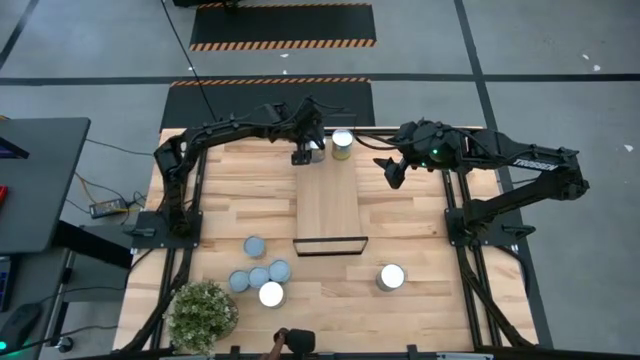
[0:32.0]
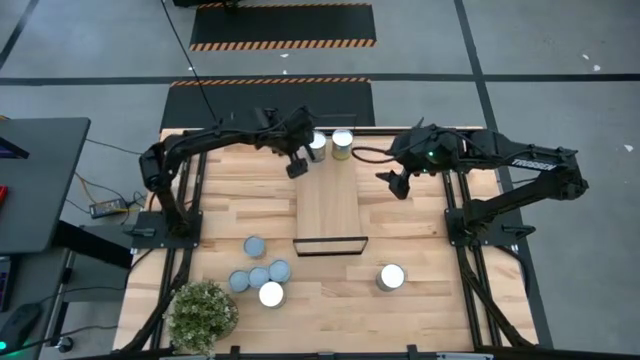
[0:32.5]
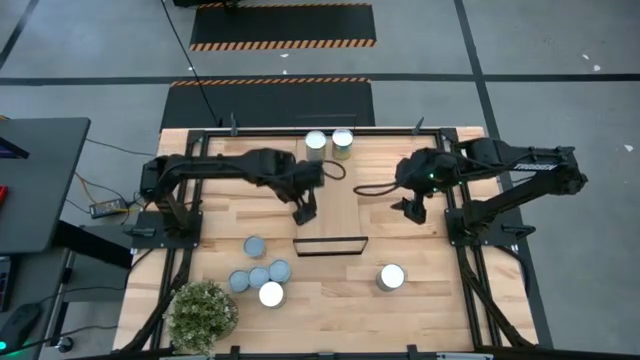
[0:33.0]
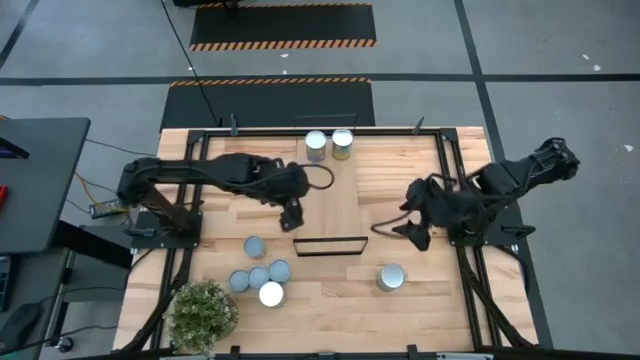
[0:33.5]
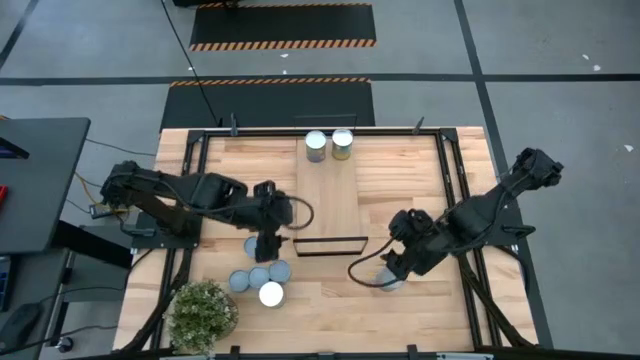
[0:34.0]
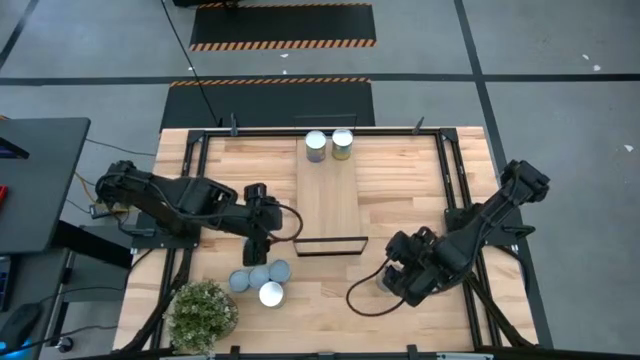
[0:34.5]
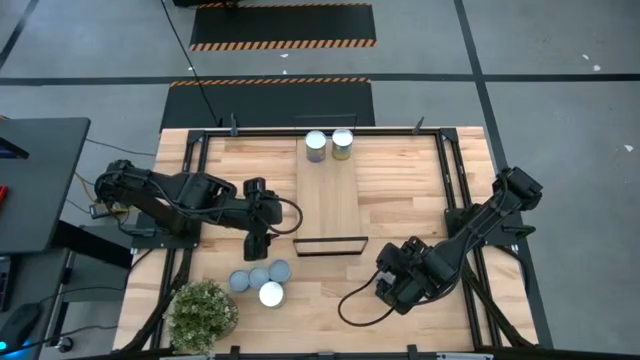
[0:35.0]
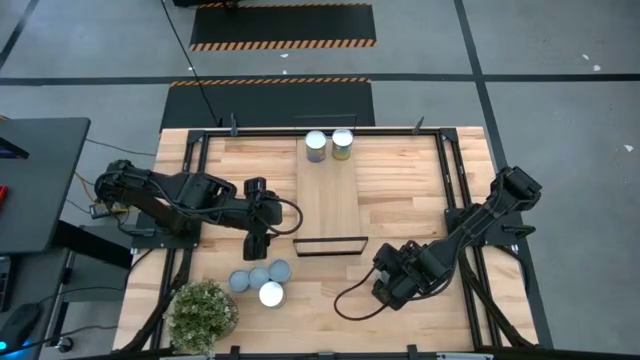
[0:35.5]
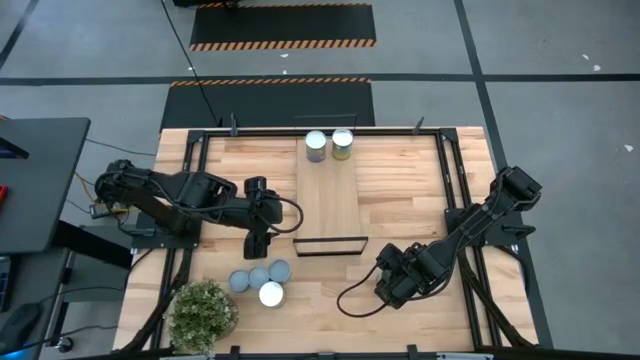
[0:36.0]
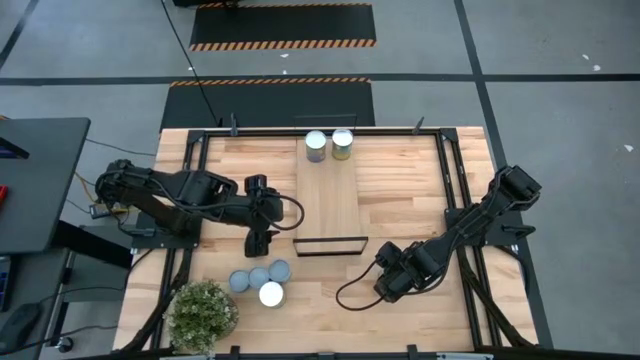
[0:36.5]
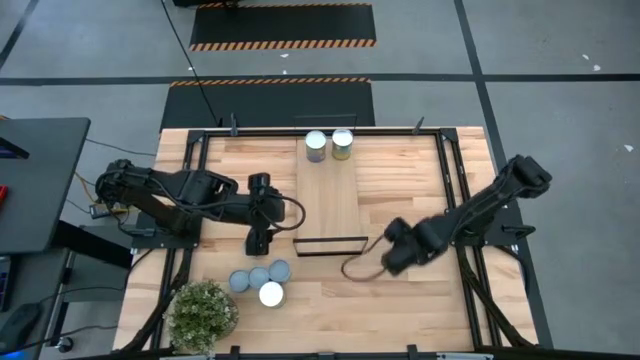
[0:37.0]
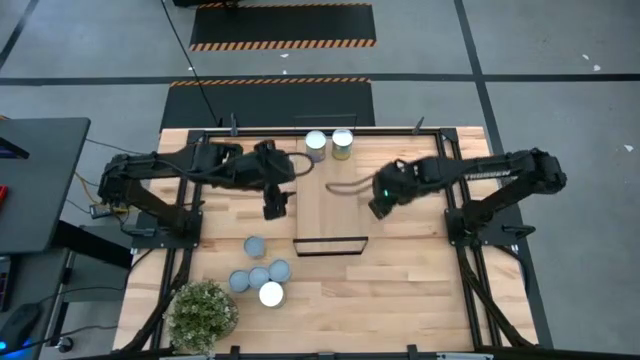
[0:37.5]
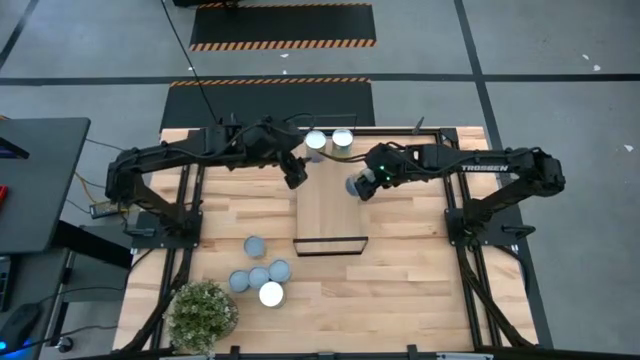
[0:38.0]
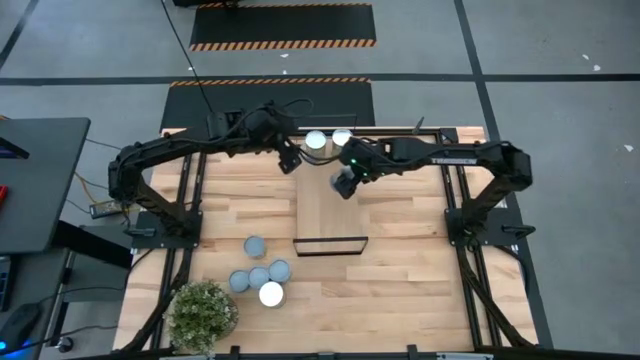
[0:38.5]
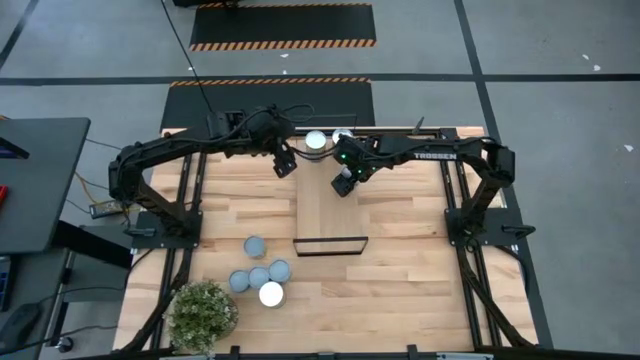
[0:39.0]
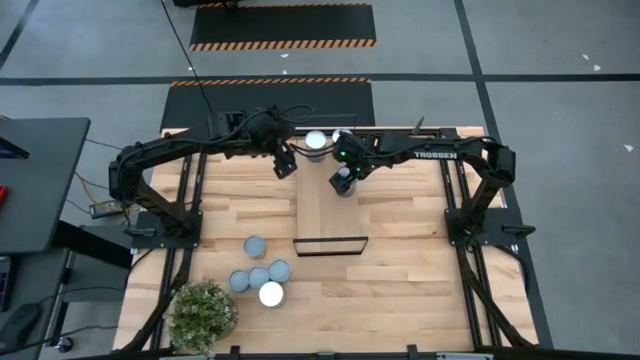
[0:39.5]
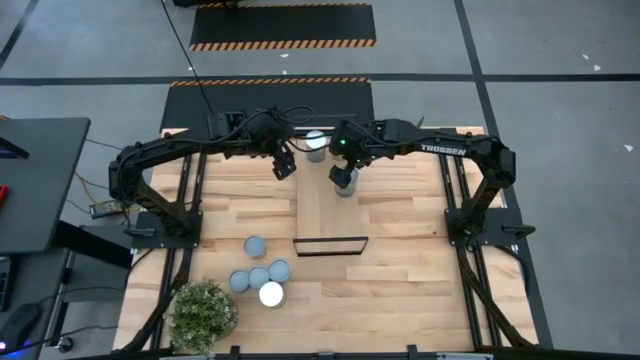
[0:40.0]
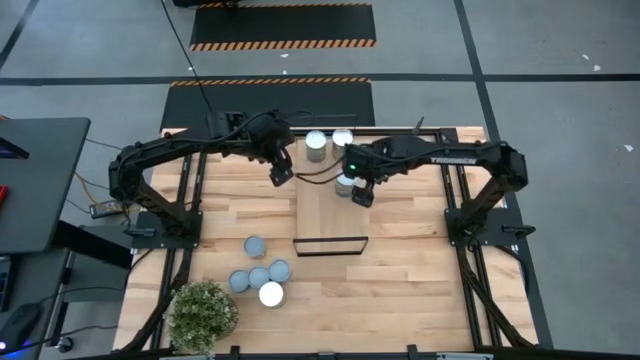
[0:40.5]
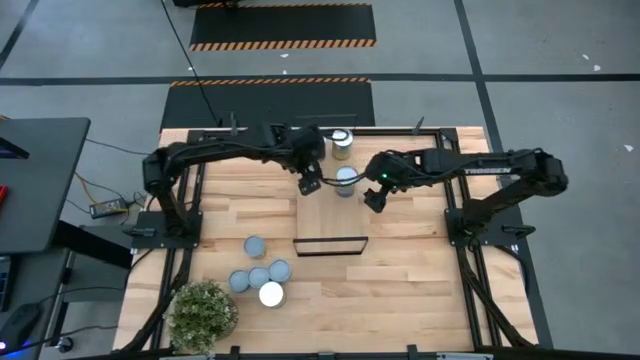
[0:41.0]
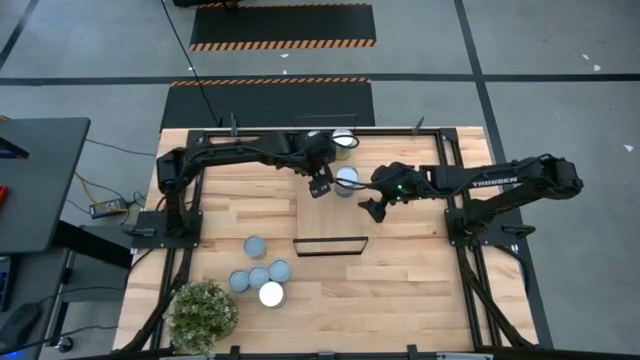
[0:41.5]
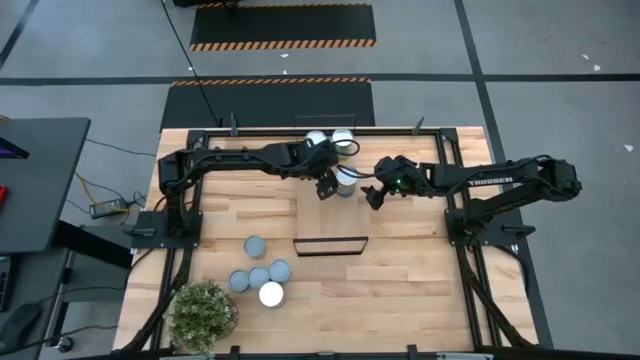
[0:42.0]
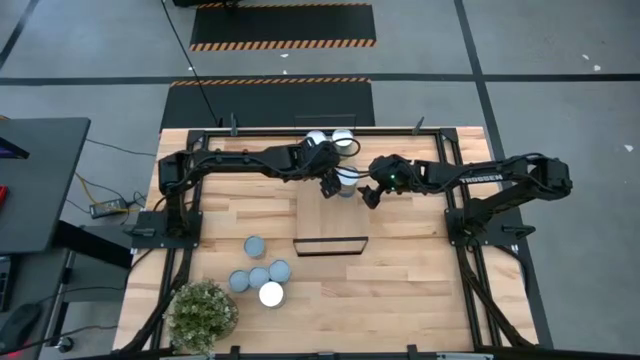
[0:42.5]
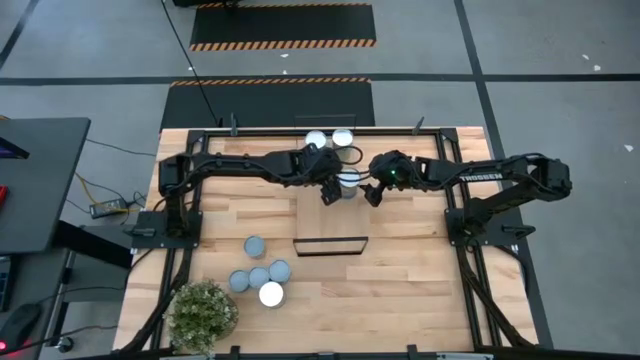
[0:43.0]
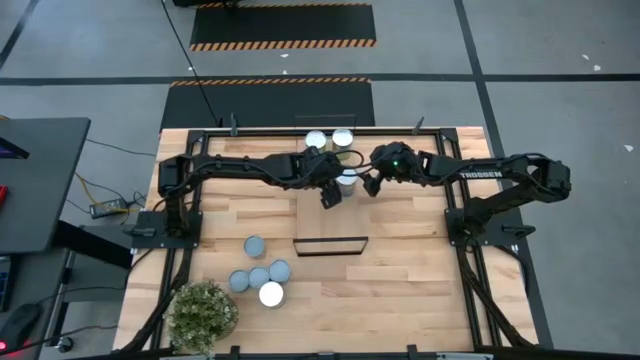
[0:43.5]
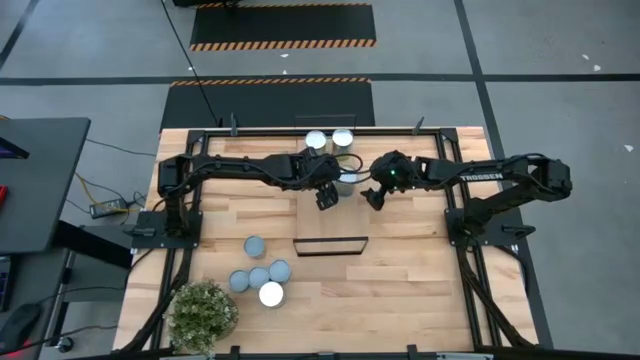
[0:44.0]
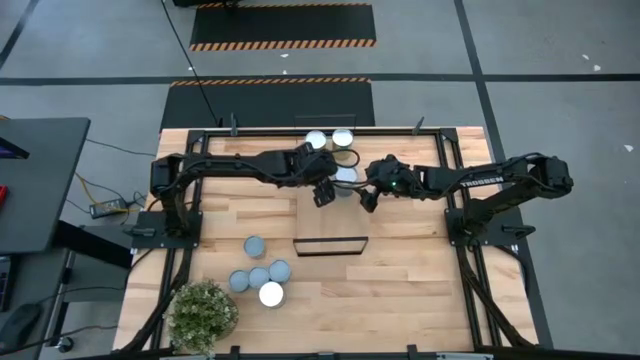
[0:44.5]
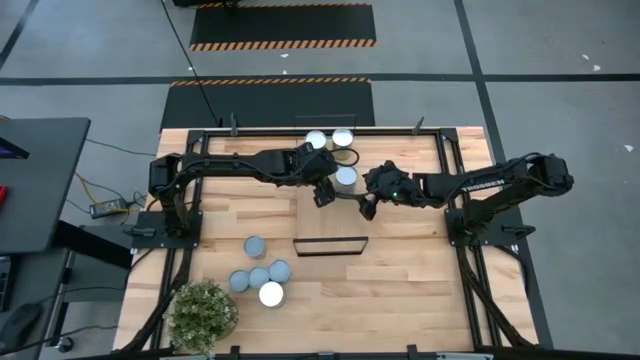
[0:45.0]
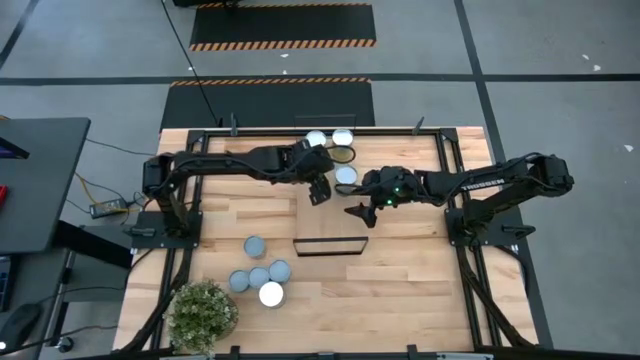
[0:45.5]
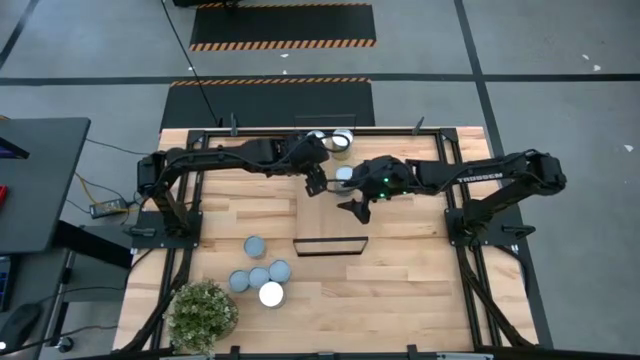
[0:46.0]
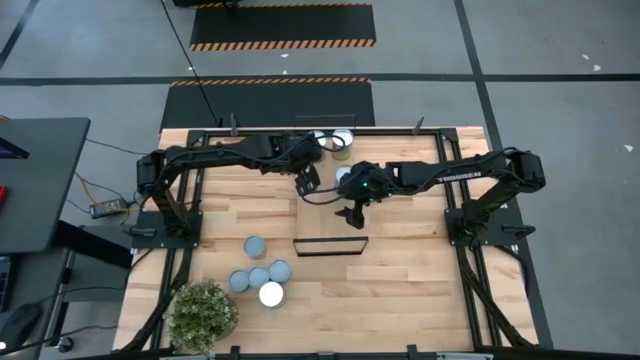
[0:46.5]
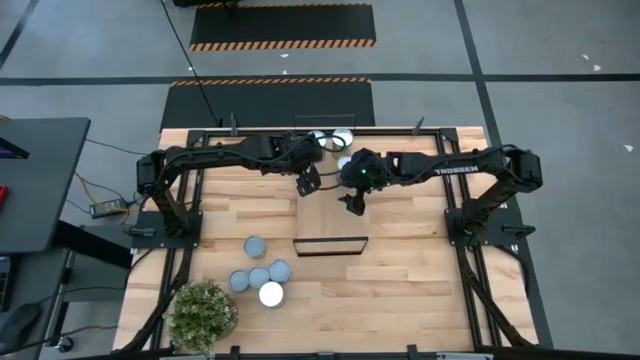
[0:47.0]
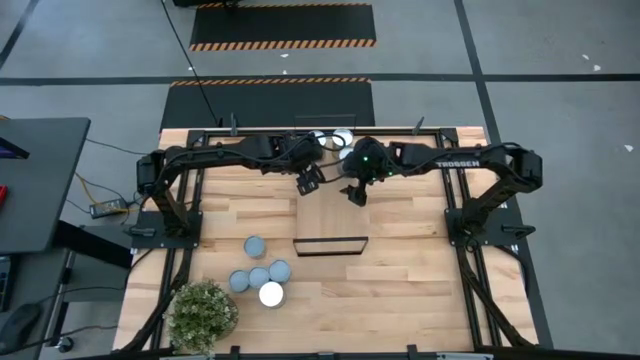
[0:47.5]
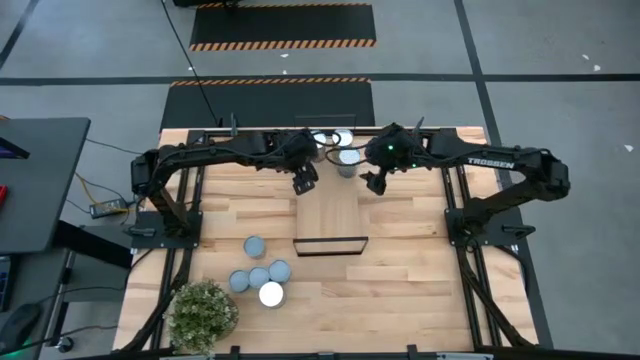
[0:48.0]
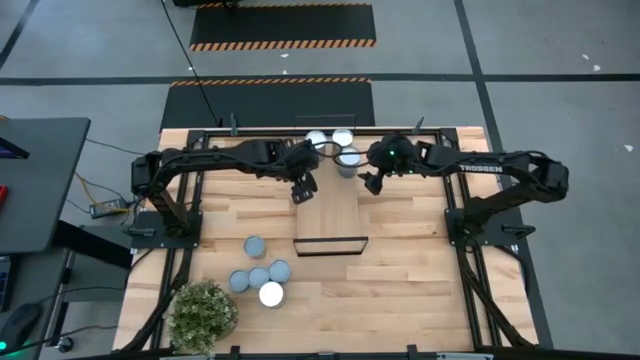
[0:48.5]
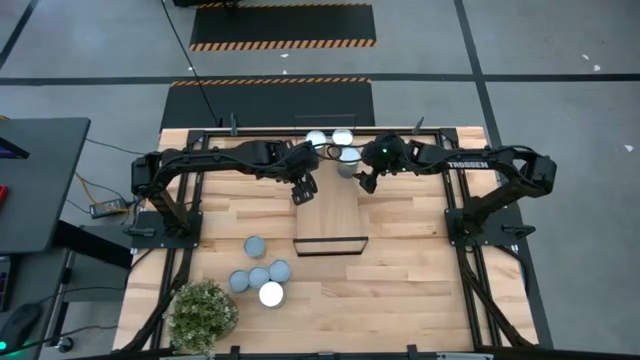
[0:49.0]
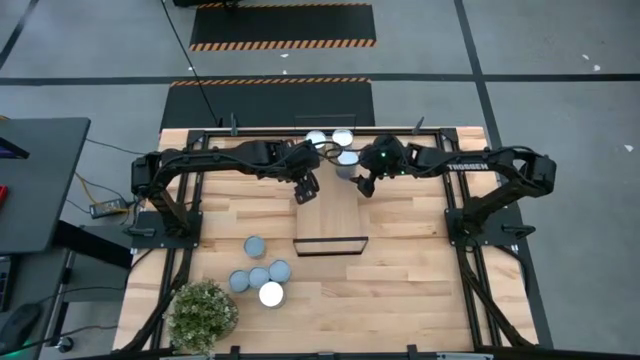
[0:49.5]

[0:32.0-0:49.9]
Task: Pick and place cans onto a shelf
Put the canned peas on the shelf
